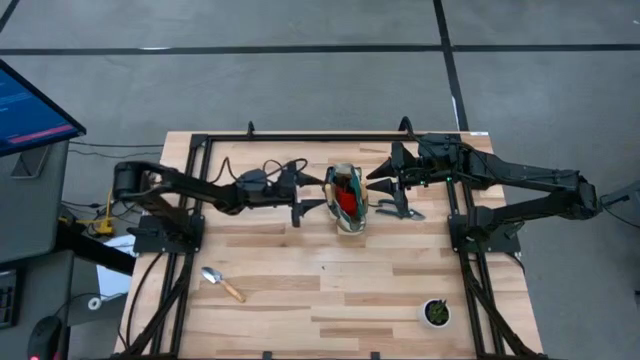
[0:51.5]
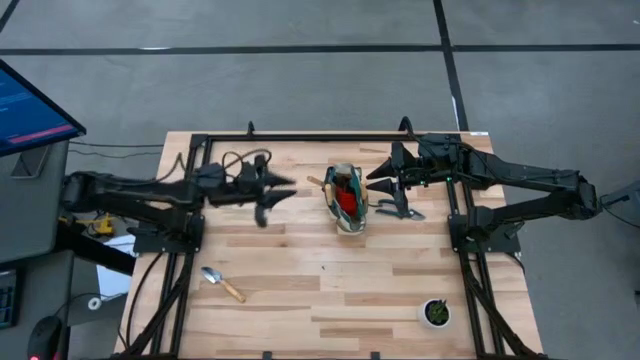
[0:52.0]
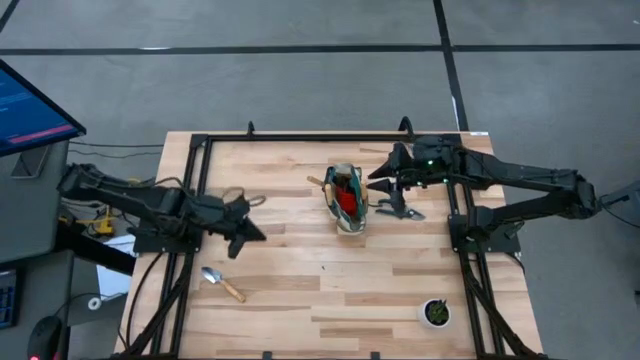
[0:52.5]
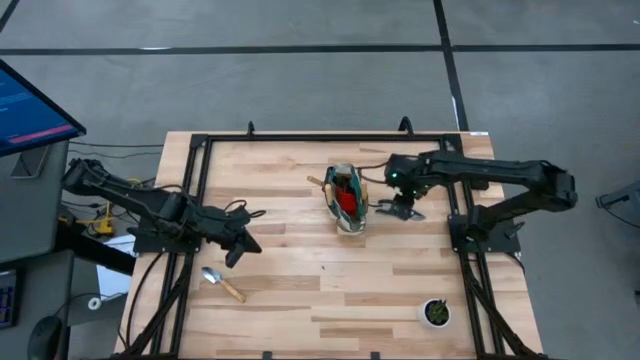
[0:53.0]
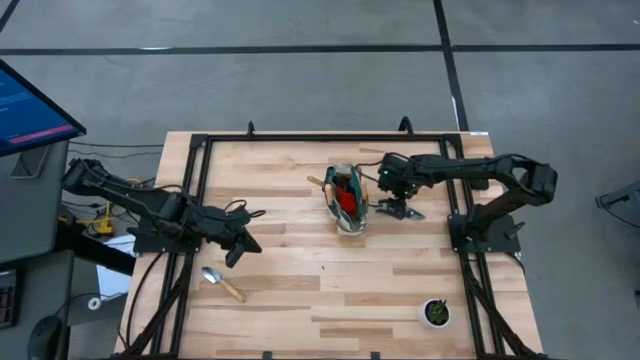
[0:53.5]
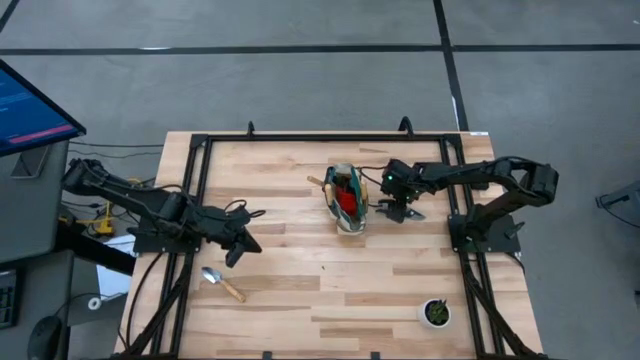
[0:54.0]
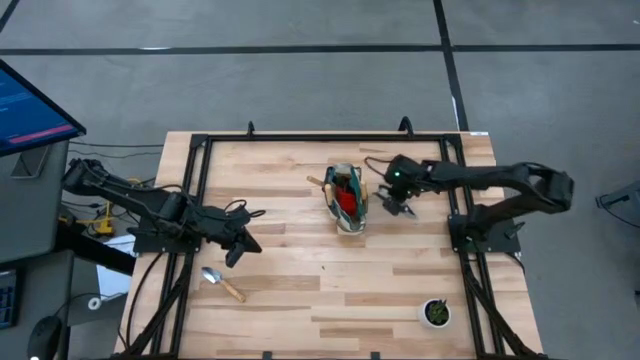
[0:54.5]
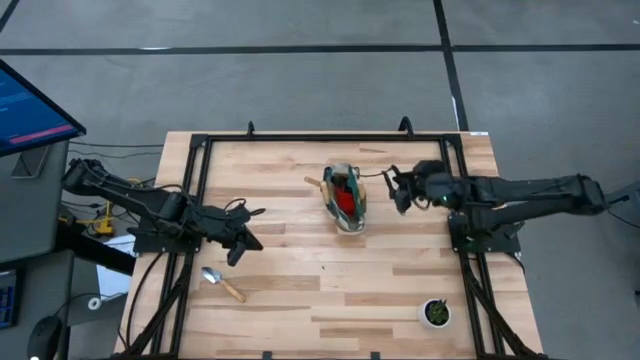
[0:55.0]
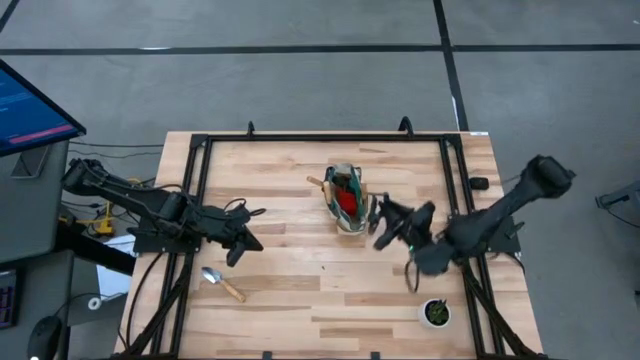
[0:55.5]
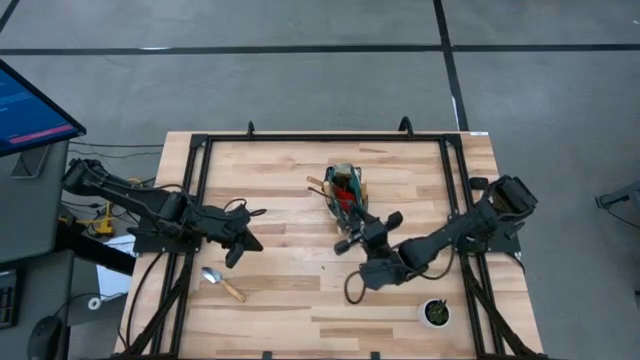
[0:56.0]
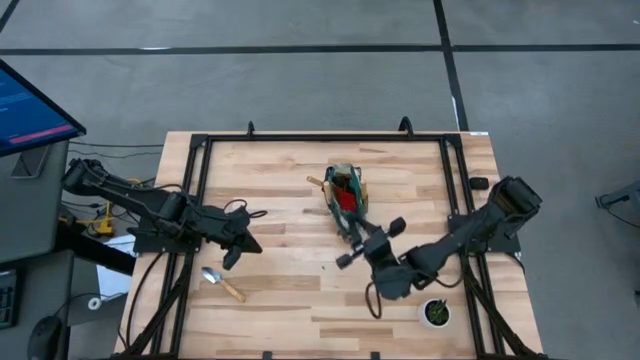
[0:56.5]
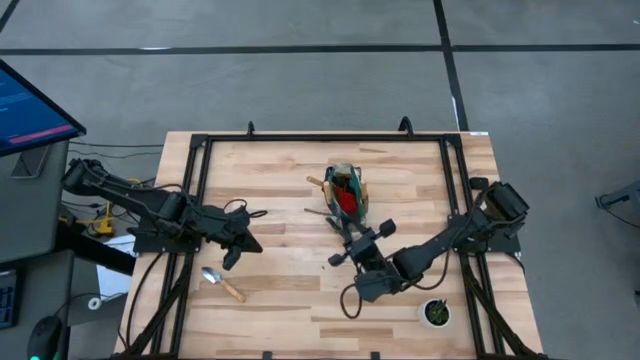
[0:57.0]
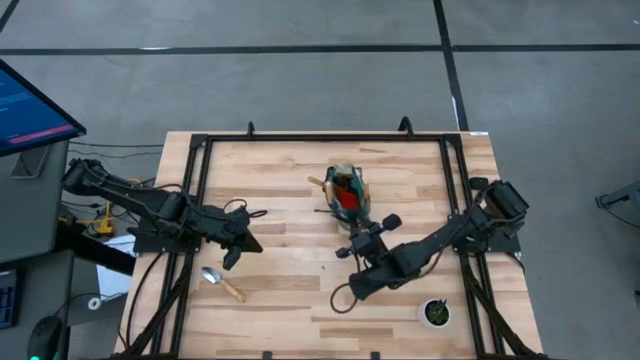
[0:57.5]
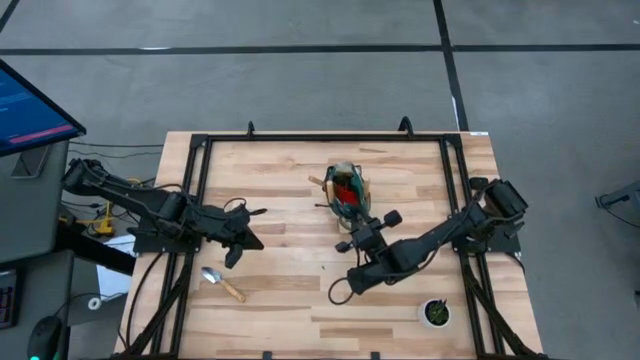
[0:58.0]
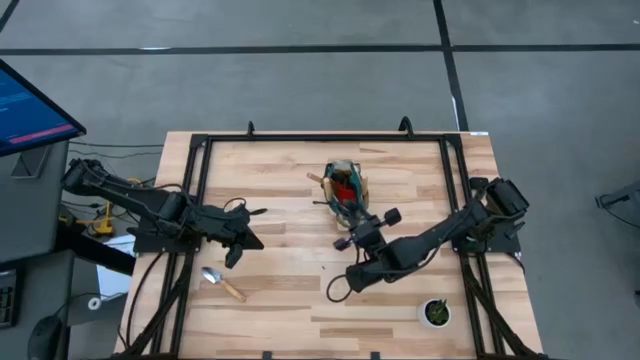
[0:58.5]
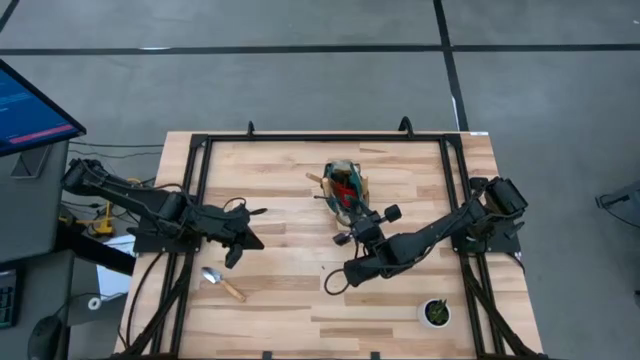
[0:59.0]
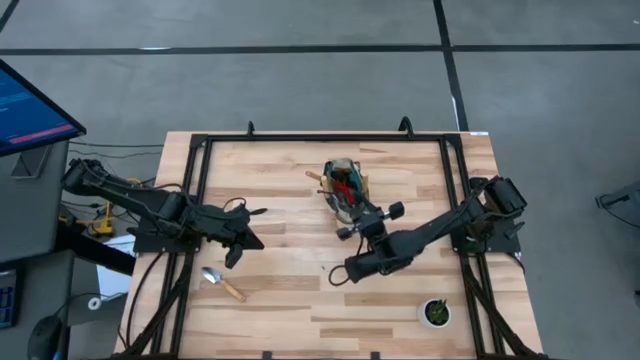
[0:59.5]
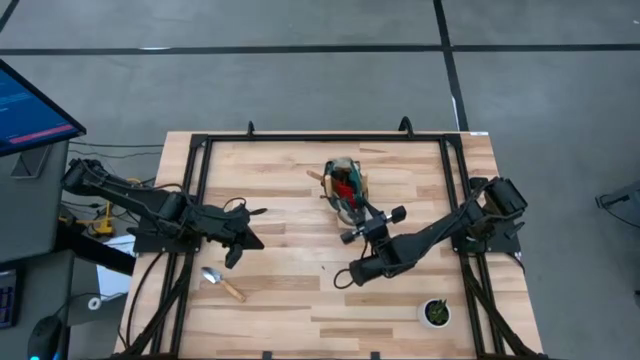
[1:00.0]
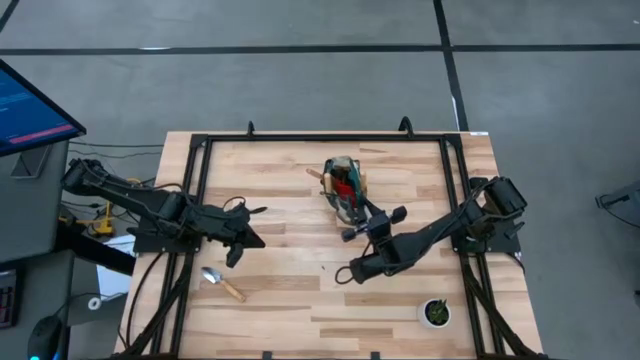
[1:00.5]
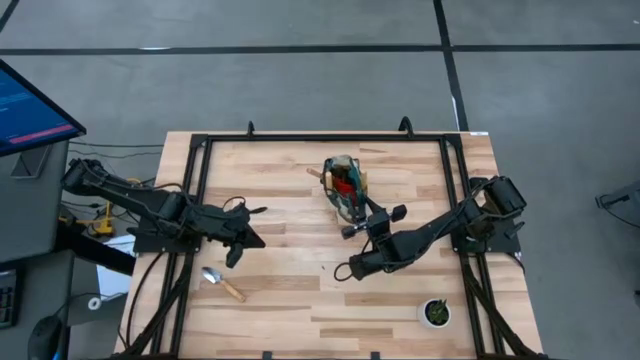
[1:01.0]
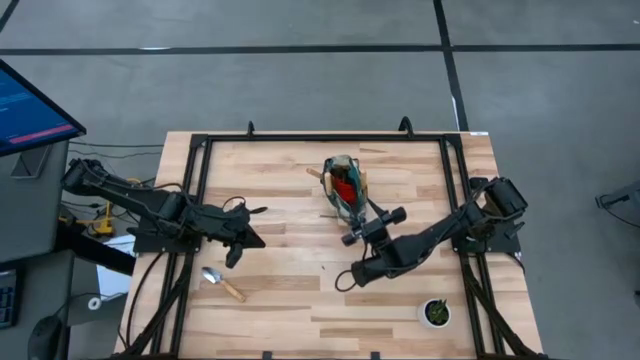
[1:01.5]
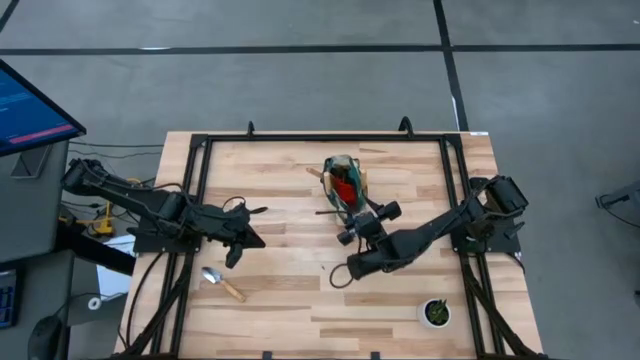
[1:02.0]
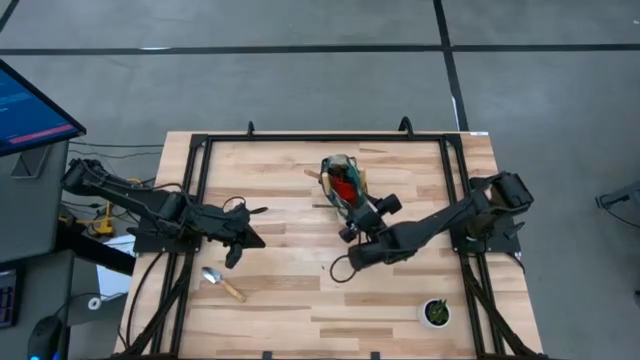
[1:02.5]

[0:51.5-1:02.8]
Task: Pick & Place Garden tools in Gardening bag
Put the shear scissors into the gardening bag
